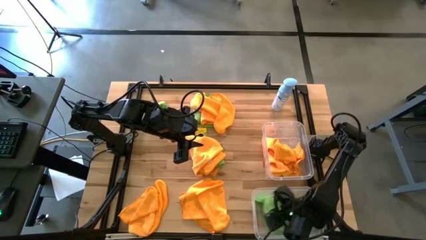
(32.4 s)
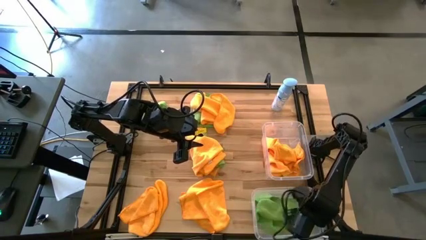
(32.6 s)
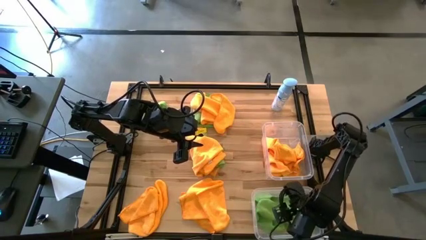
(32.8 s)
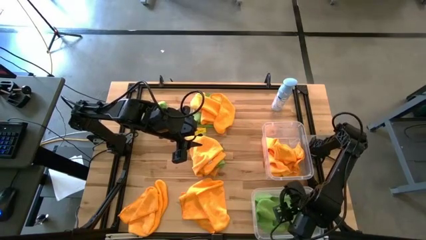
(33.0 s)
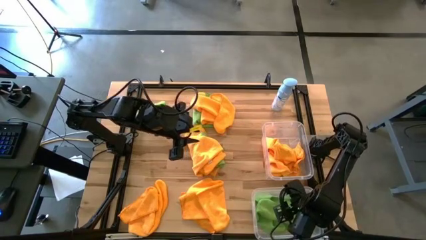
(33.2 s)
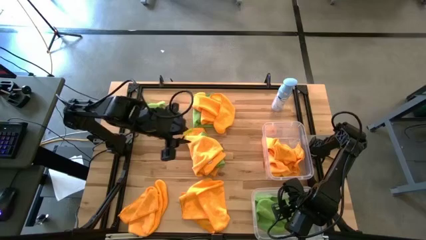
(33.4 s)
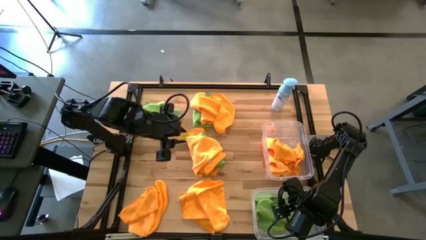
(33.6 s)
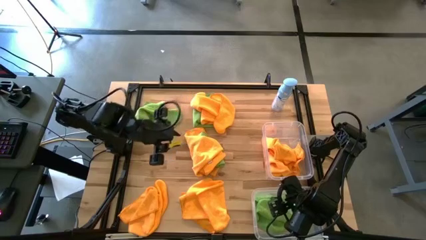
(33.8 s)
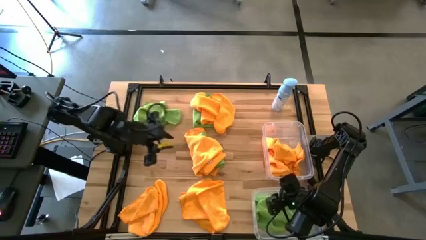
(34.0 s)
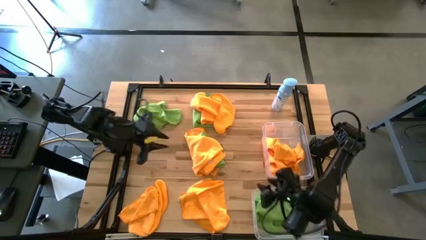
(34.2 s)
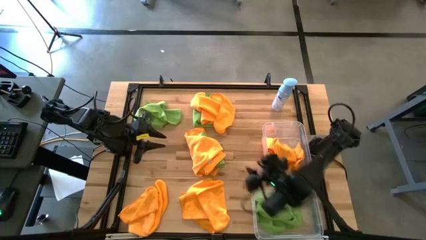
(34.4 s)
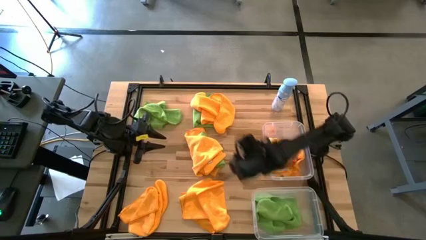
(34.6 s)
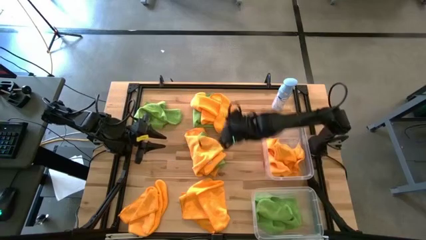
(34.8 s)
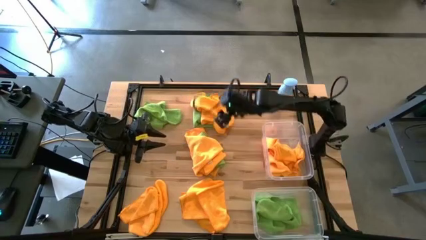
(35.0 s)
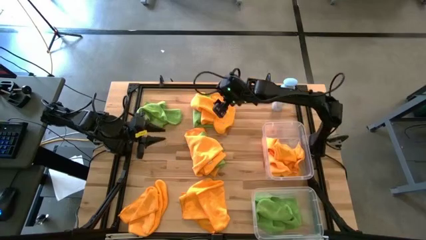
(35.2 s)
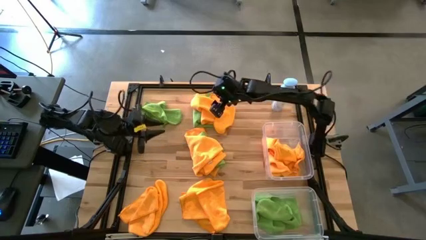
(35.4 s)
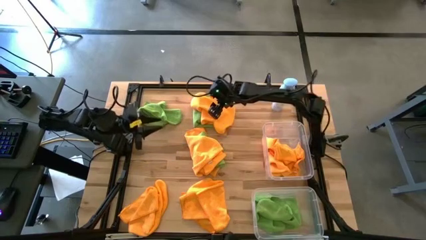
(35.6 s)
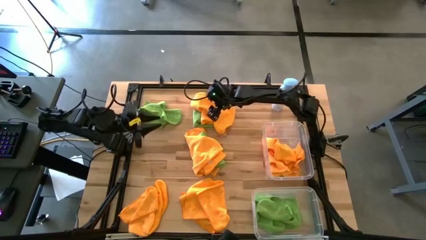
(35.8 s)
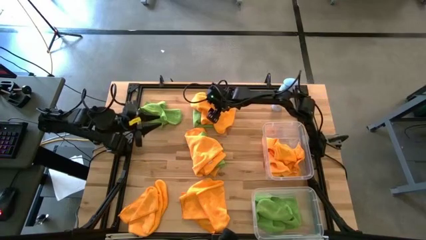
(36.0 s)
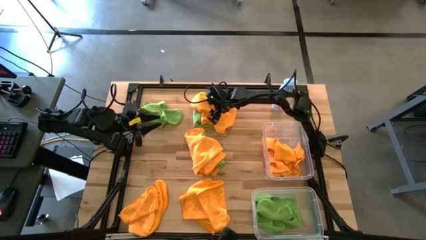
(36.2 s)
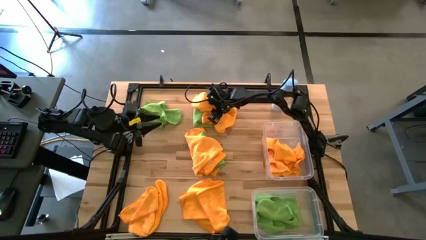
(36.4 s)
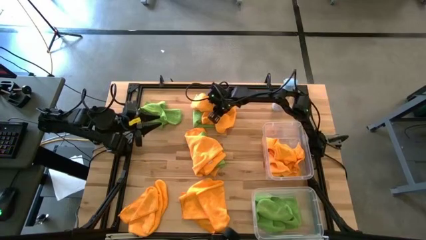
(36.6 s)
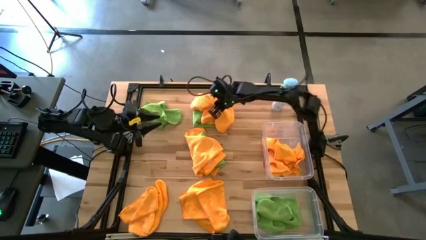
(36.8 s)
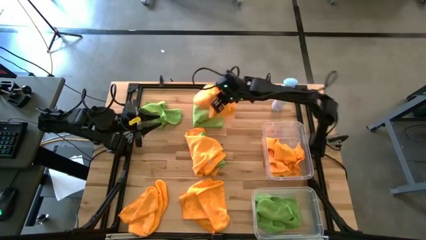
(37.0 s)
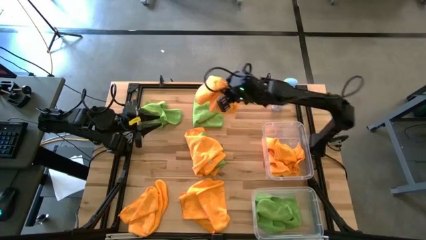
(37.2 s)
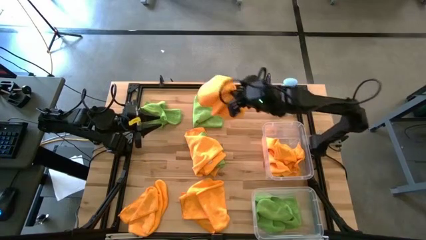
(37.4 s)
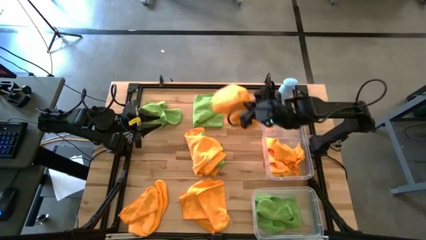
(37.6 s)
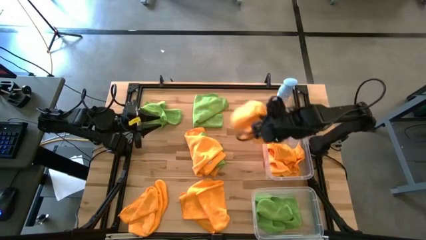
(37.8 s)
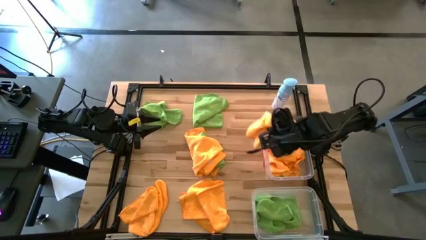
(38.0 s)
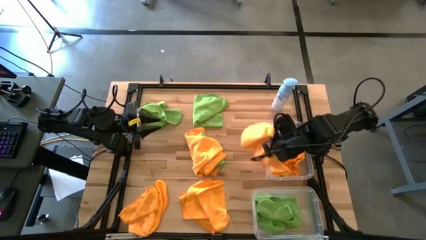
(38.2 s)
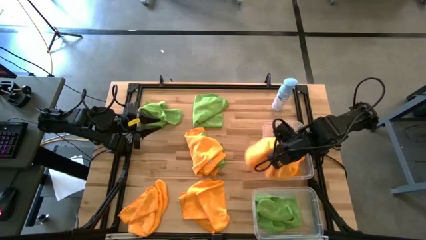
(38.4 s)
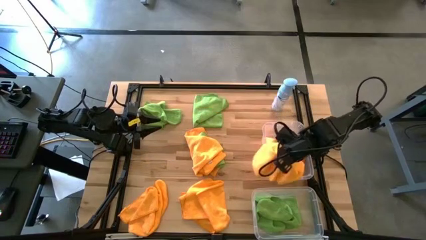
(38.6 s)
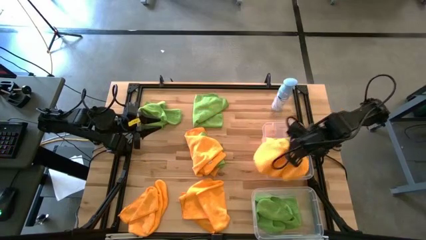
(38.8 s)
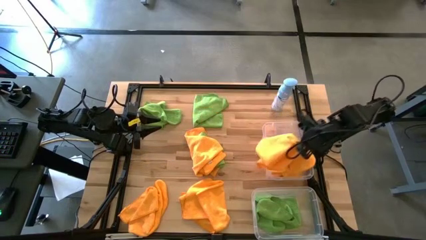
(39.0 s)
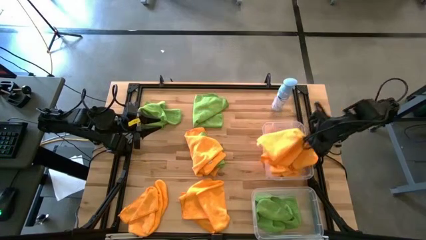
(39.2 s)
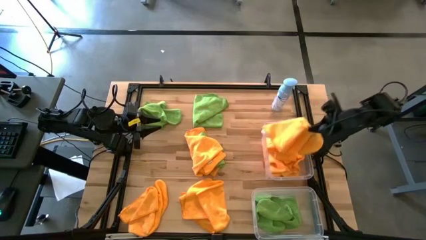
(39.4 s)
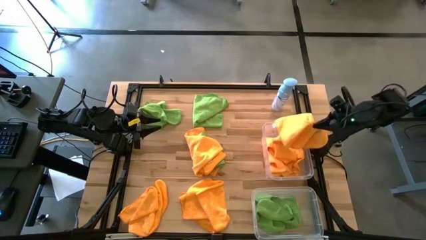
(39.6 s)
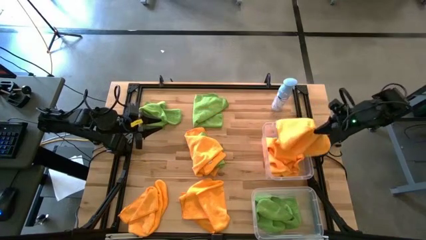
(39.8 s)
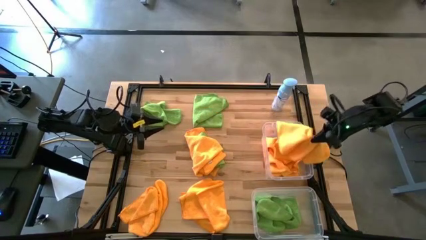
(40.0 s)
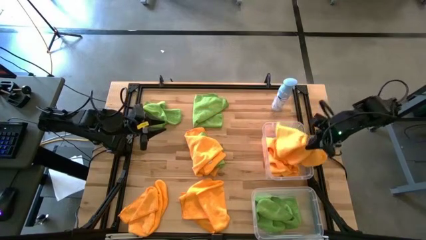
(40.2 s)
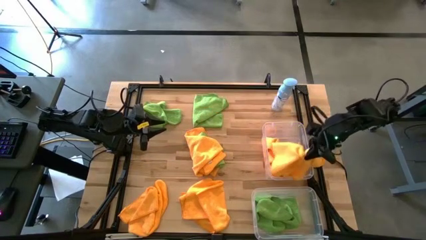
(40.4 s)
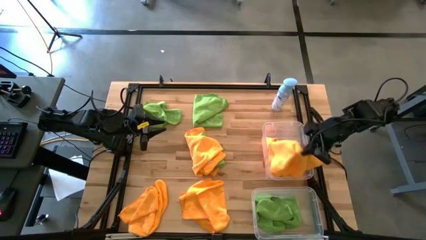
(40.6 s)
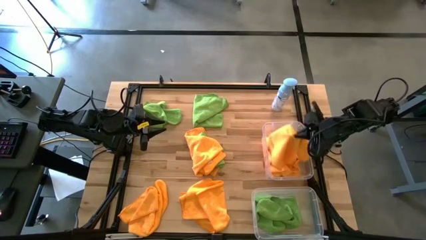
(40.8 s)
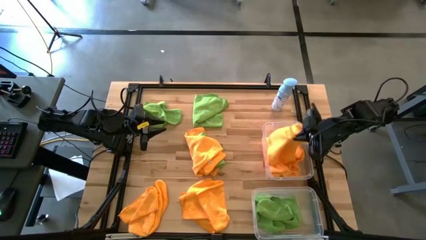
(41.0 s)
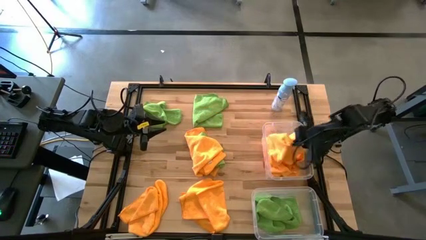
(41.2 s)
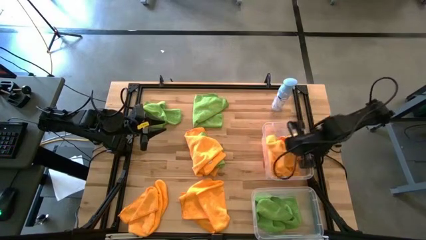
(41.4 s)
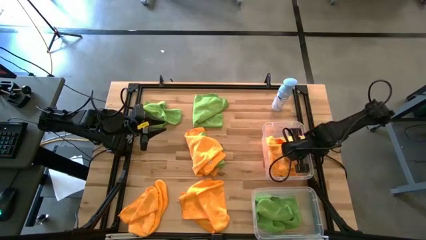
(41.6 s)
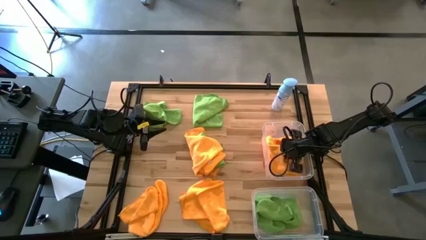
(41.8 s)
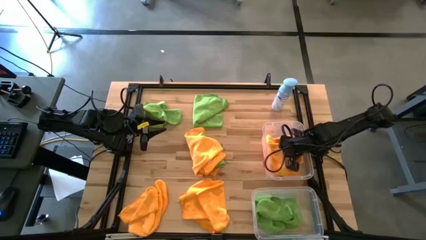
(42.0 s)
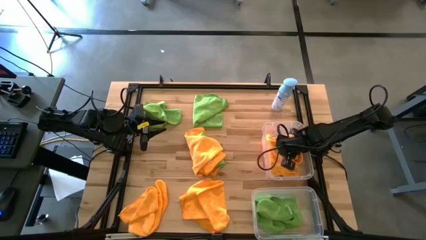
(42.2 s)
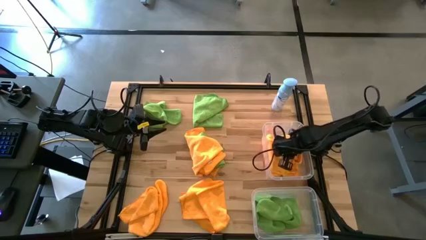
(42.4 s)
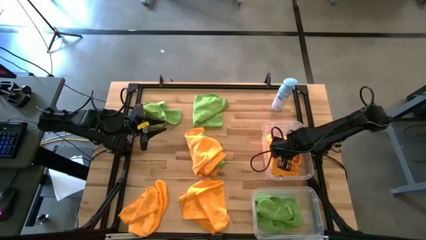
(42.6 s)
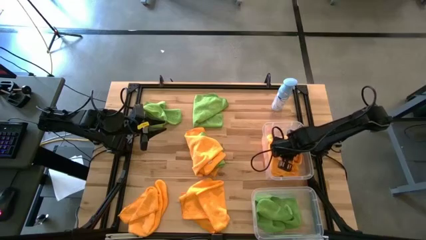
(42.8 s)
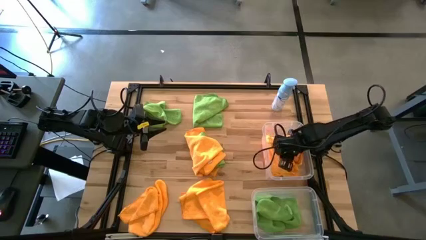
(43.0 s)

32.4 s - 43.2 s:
Task: Sort microfiber towel by color & place in baskets
Put the yellow towel into the top transparent bin

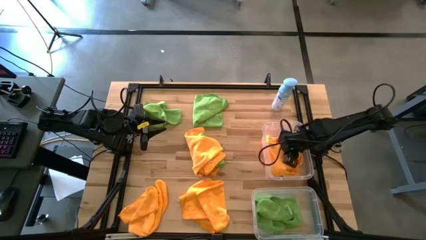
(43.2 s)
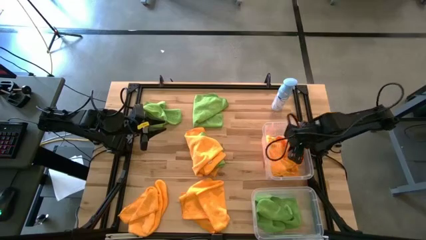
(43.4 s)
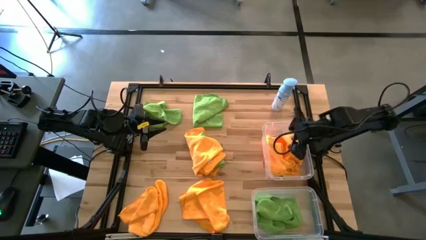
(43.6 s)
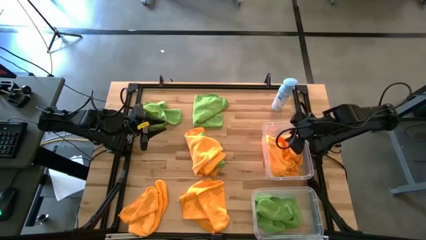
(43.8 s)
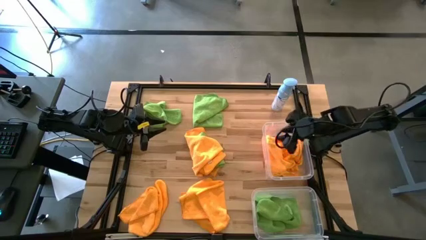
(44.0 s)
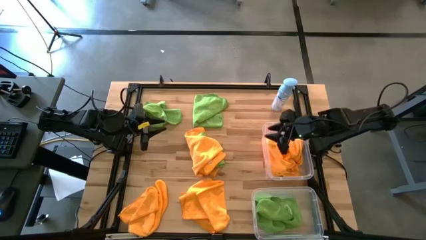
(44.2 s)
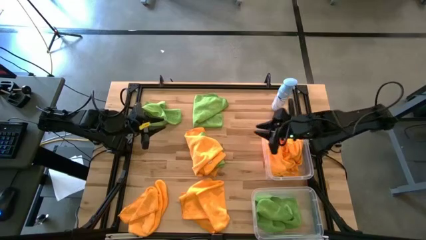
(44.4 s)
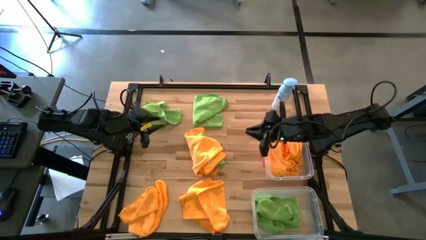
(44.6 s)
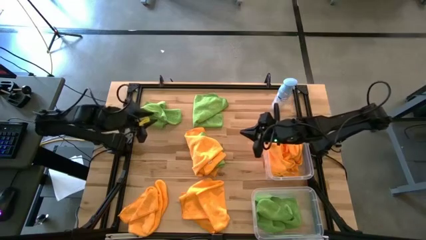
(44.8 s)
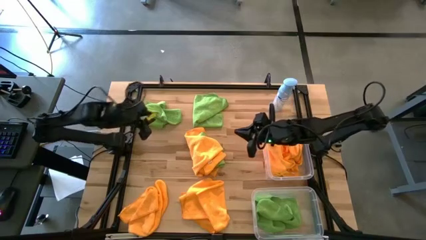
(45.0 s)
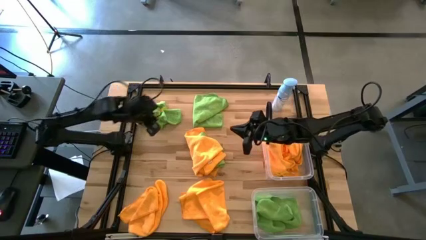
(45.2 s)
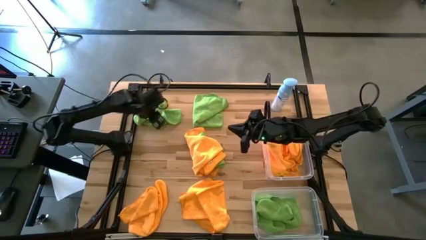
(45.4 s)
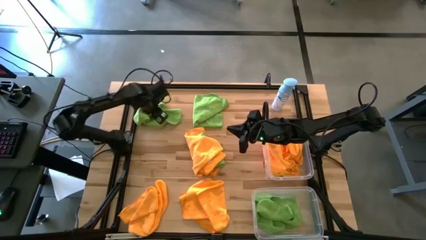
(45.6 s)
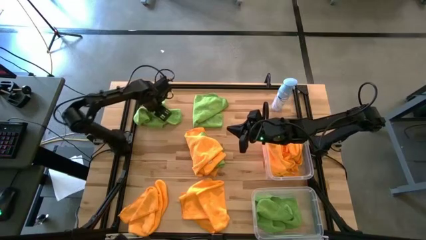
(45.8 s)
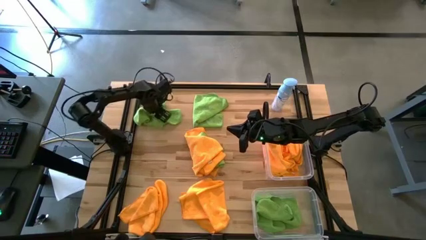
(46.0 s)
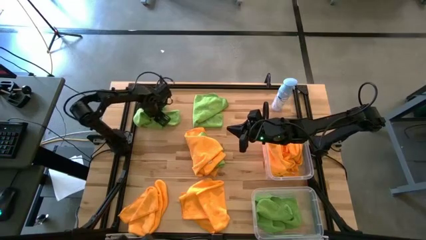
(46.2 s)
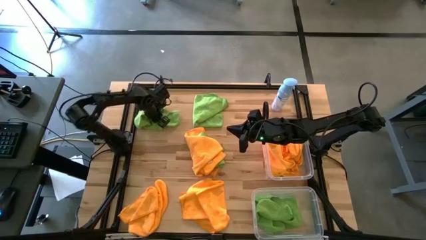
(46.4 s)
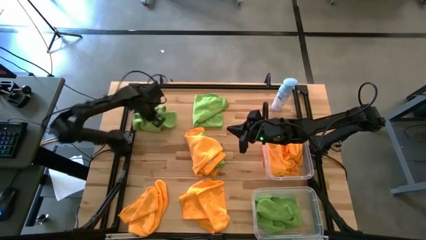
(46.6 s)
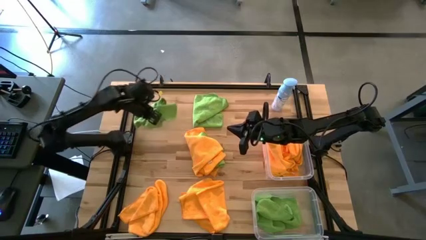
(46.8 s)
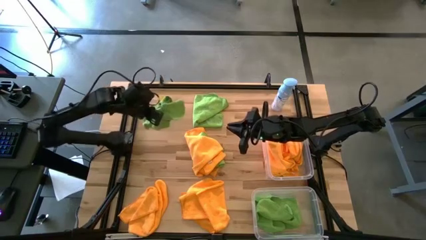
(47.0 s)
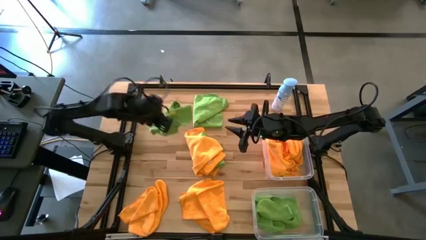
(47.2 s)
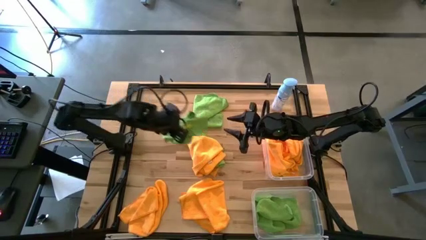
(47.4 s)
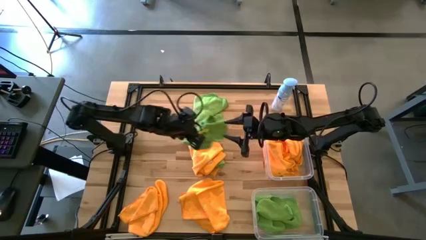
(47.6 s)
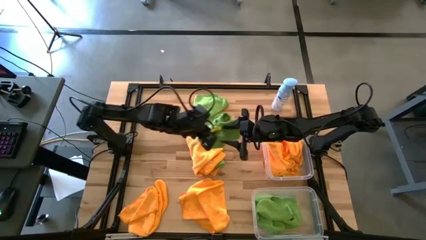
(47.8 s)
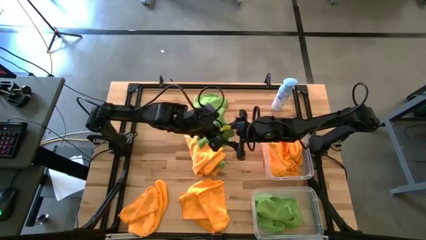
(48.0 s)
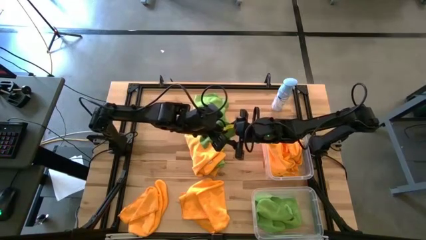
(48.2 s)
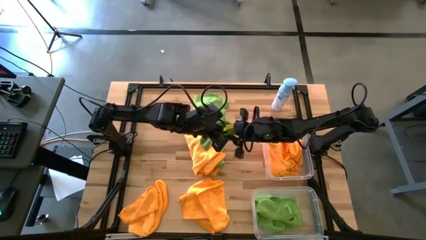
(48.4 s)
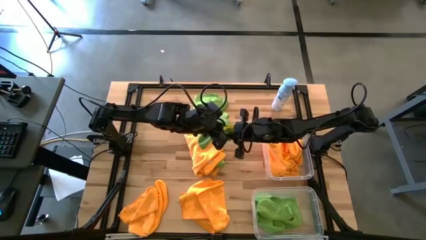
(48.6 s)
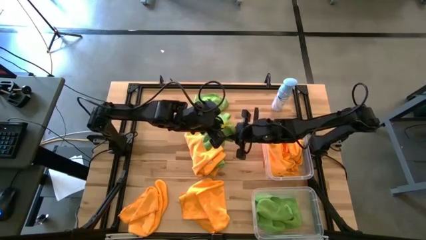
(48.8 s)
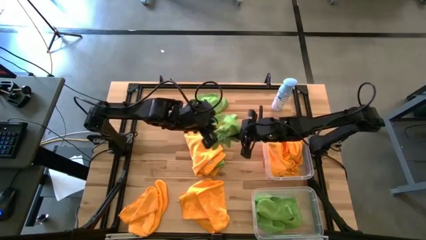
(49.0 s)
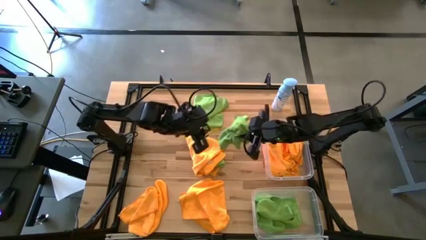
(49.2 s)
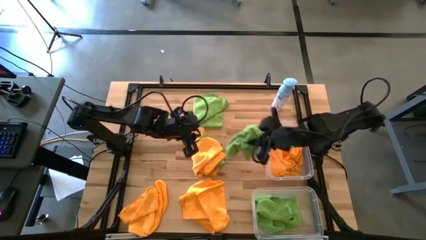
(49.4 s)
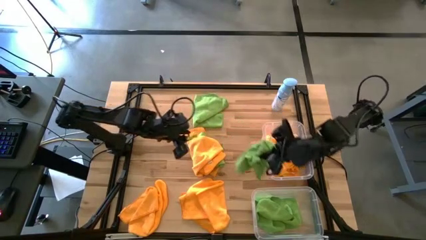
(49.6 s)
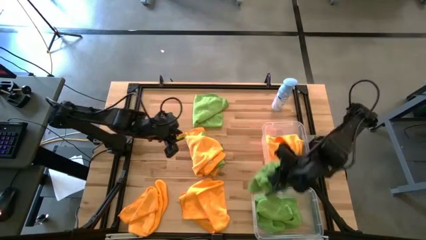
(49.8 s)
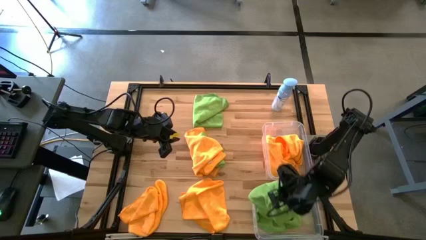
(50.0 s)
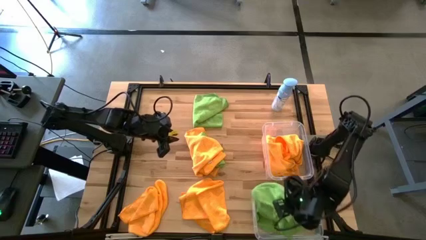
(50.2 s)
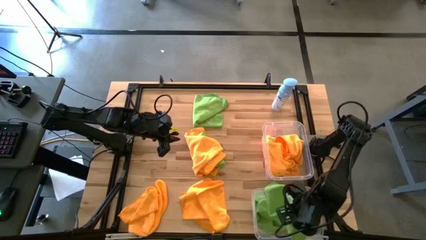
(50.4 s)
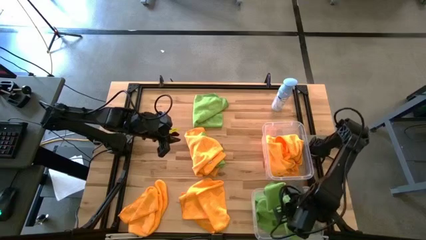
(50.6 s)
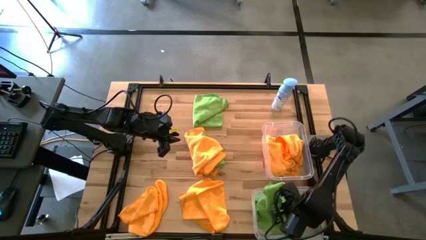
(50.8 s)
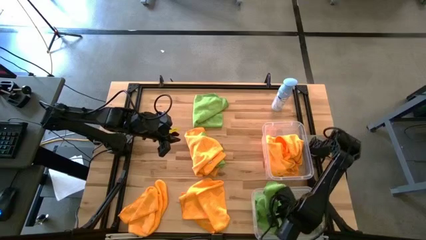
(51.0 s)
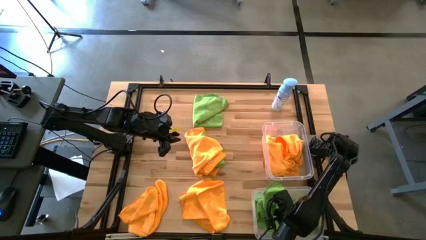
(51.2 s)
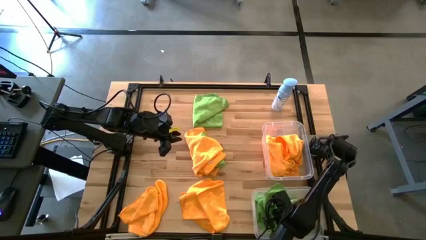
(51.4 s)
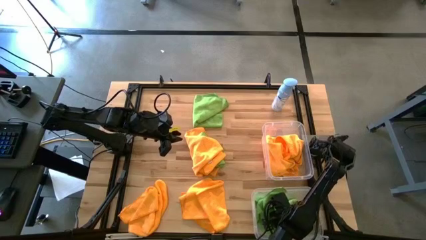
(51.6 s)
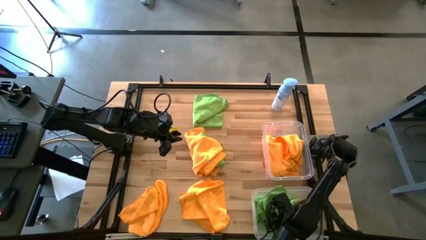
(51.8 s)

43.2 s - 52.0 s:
Put the green towel into the bottom transparent bin
